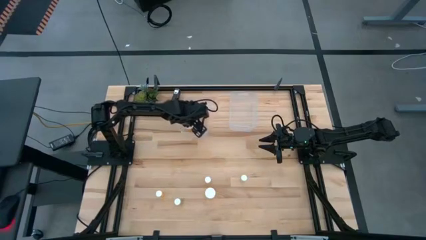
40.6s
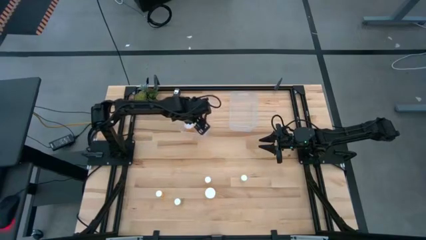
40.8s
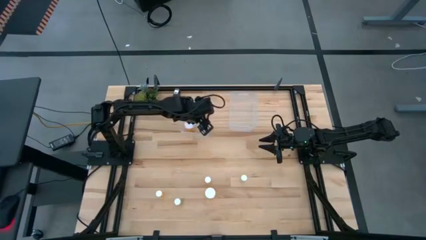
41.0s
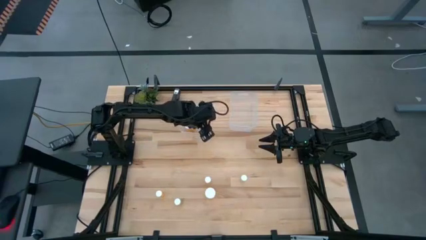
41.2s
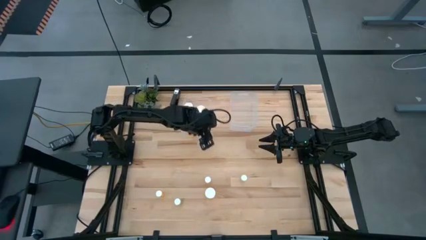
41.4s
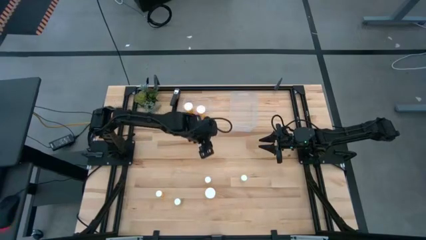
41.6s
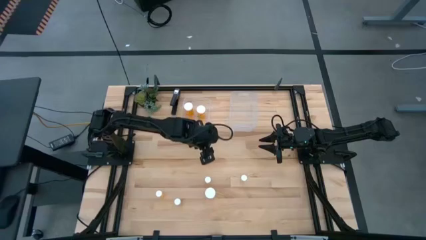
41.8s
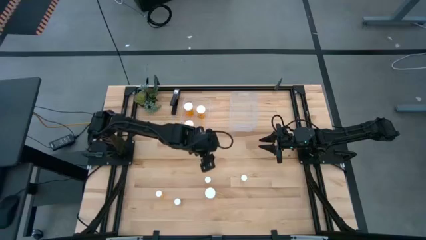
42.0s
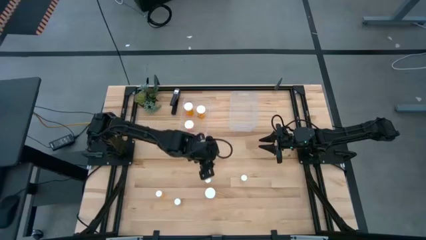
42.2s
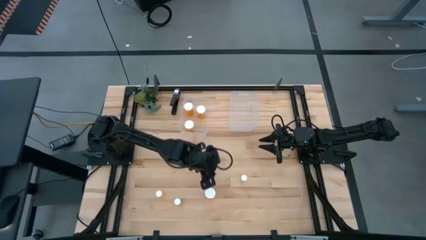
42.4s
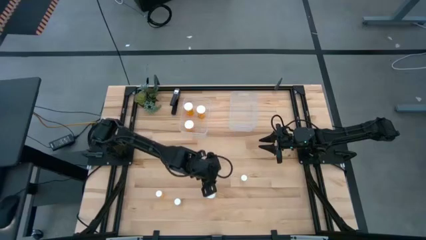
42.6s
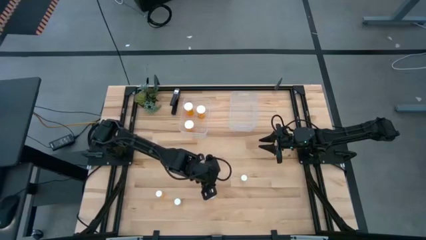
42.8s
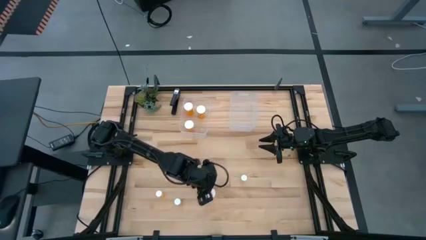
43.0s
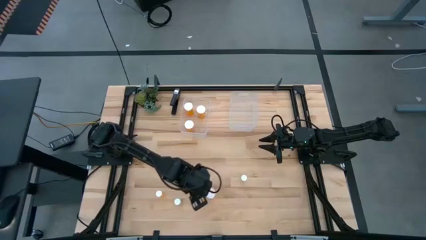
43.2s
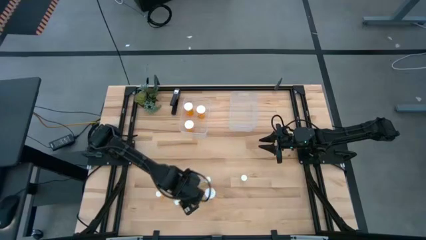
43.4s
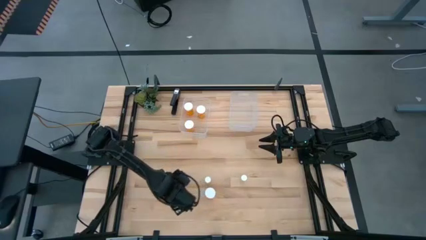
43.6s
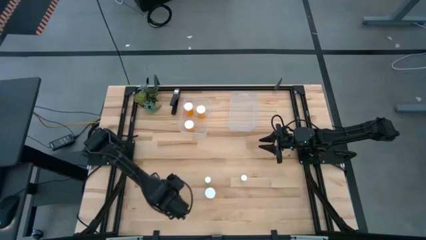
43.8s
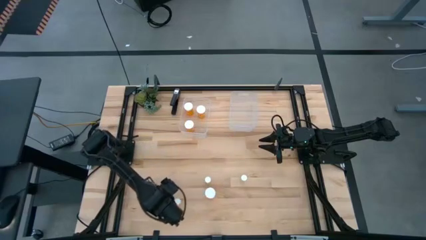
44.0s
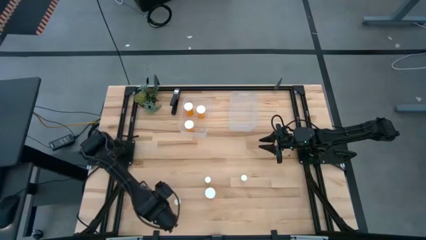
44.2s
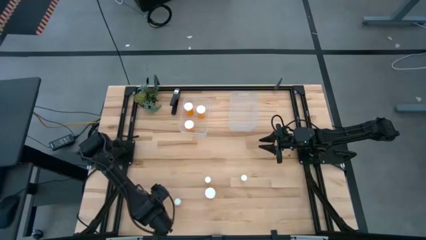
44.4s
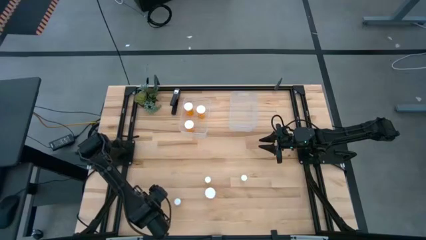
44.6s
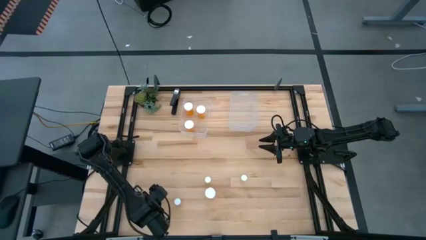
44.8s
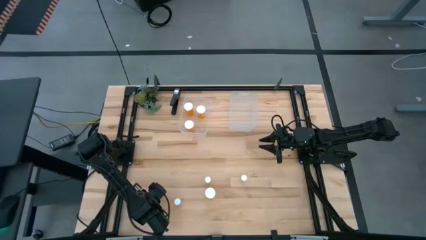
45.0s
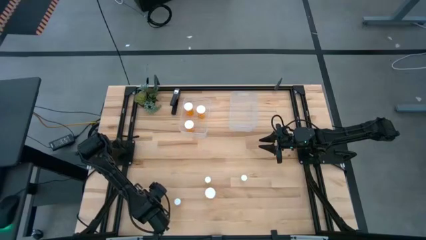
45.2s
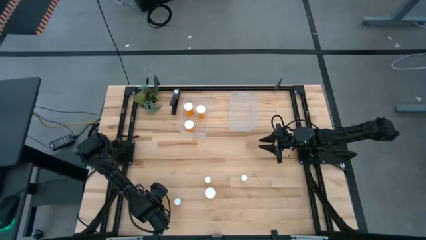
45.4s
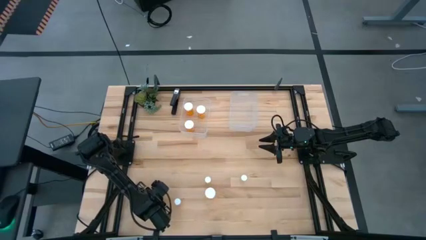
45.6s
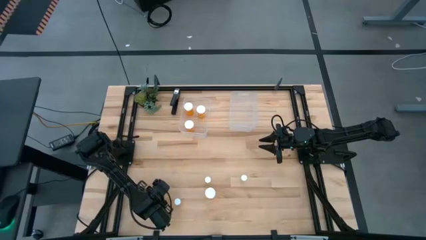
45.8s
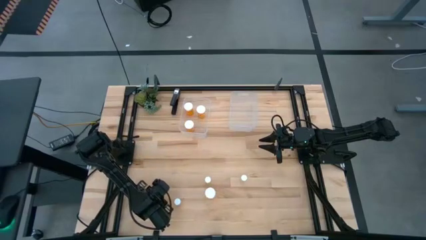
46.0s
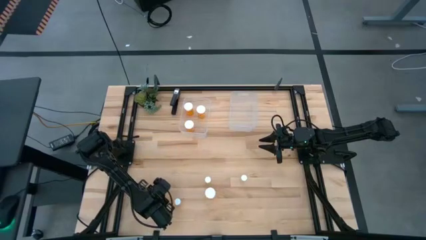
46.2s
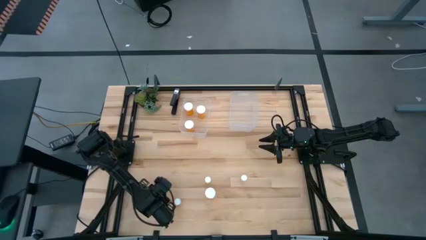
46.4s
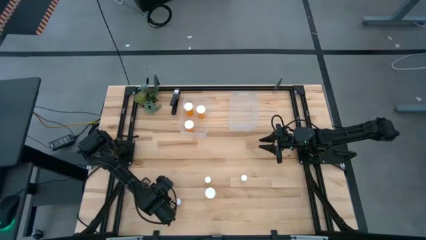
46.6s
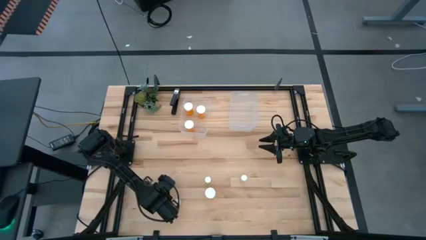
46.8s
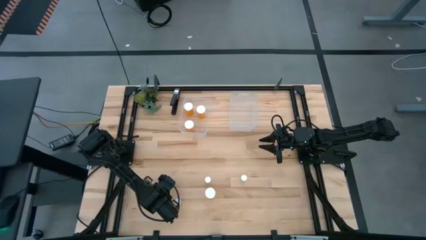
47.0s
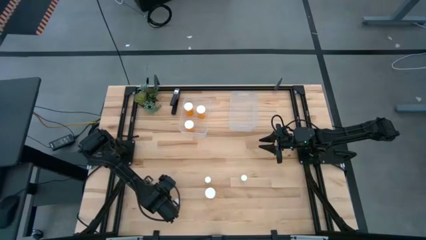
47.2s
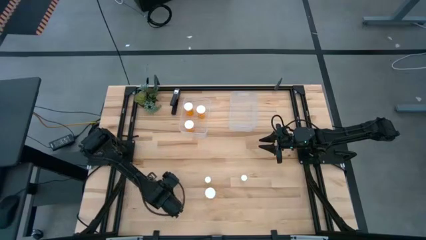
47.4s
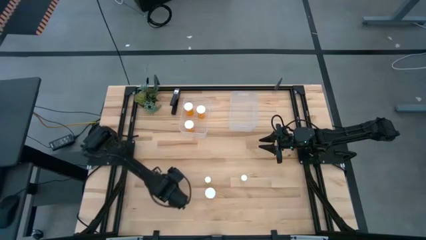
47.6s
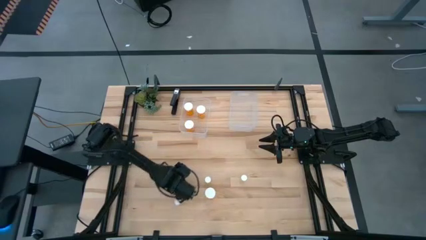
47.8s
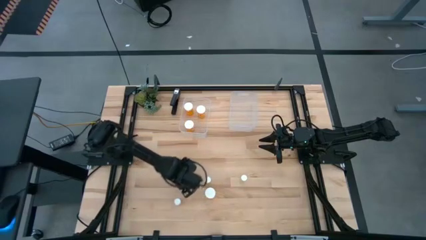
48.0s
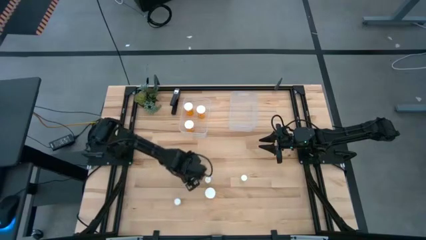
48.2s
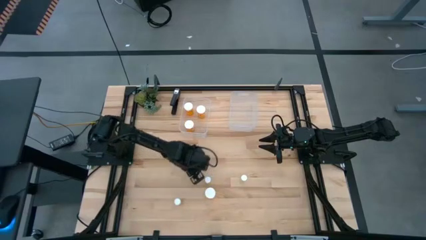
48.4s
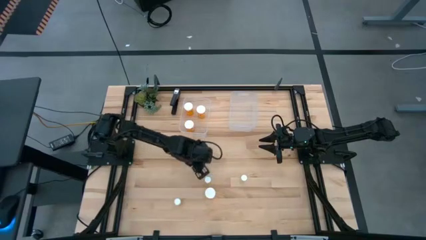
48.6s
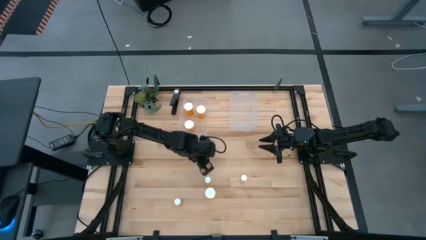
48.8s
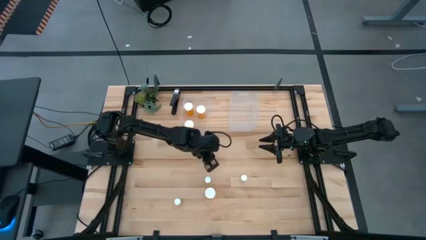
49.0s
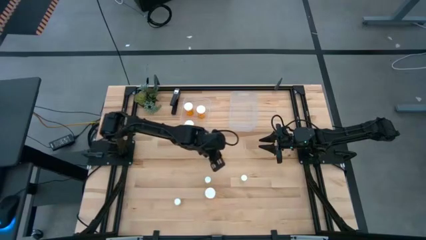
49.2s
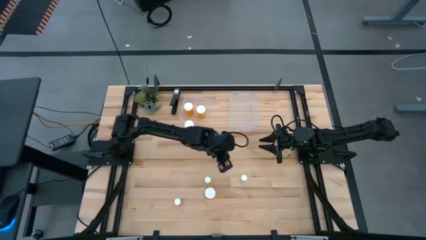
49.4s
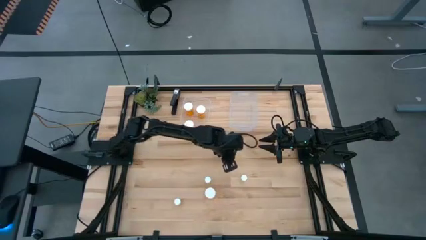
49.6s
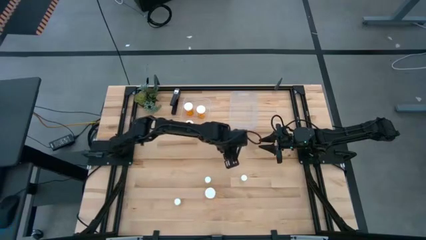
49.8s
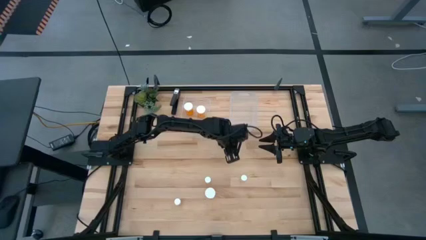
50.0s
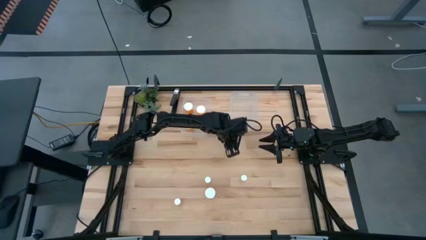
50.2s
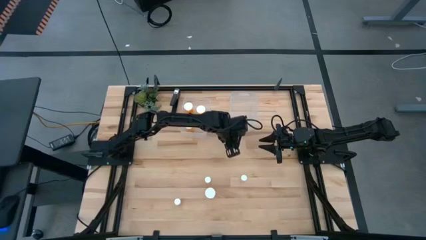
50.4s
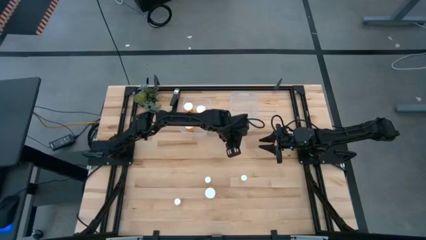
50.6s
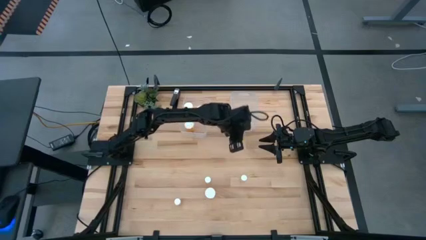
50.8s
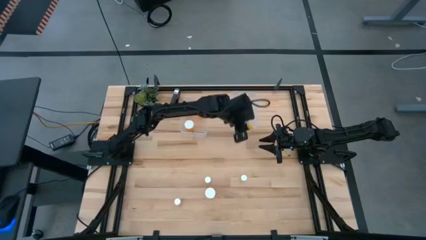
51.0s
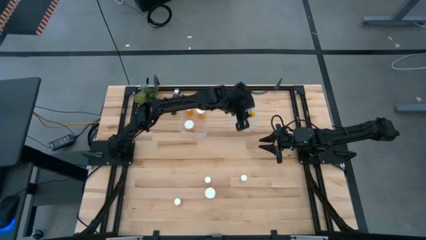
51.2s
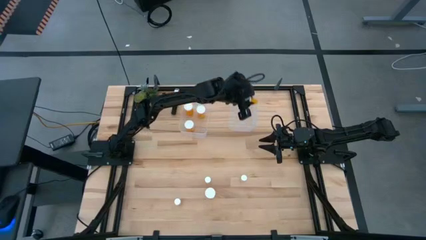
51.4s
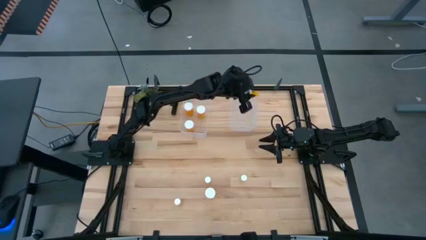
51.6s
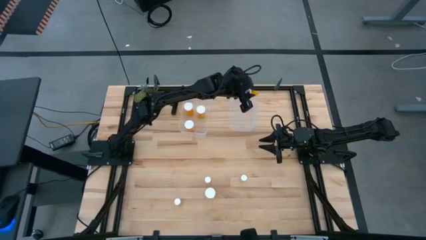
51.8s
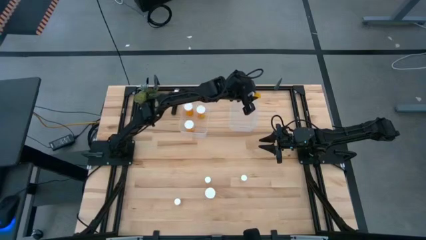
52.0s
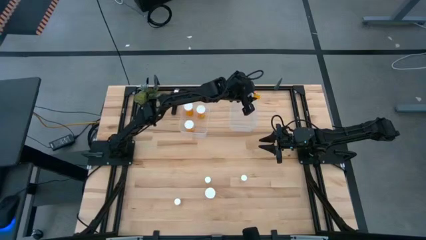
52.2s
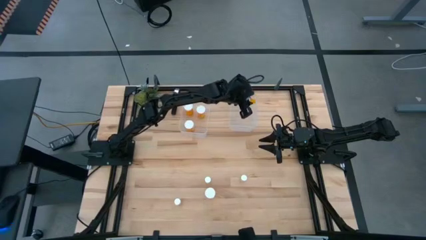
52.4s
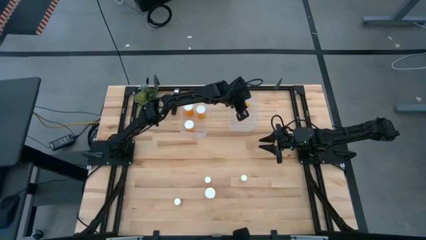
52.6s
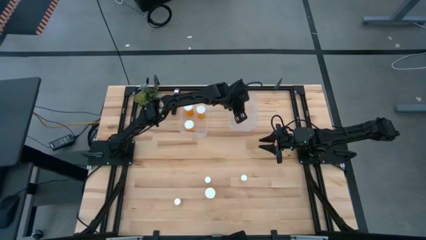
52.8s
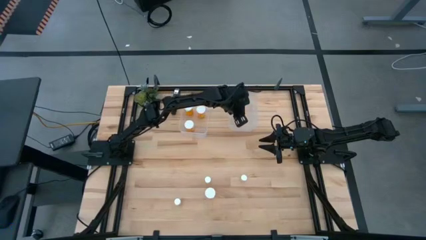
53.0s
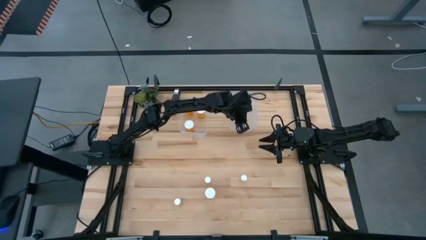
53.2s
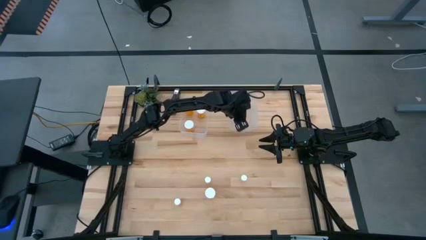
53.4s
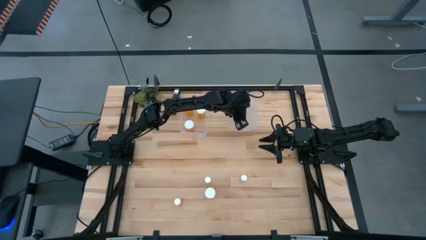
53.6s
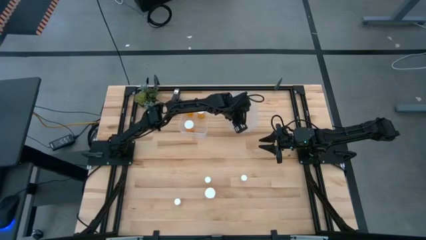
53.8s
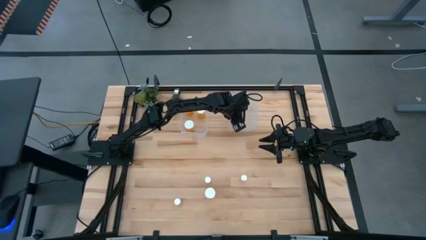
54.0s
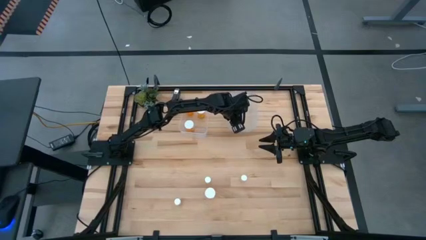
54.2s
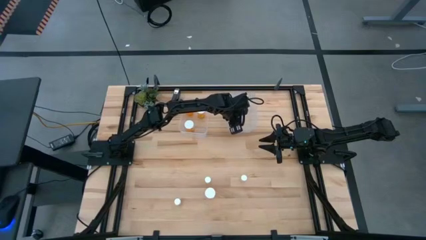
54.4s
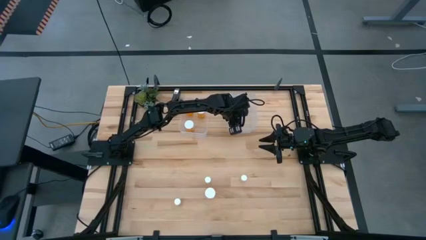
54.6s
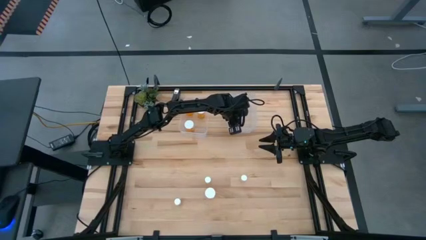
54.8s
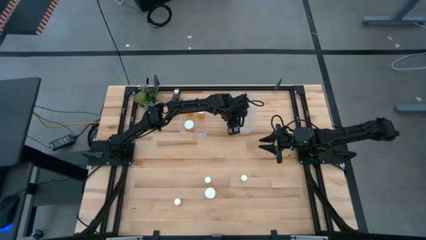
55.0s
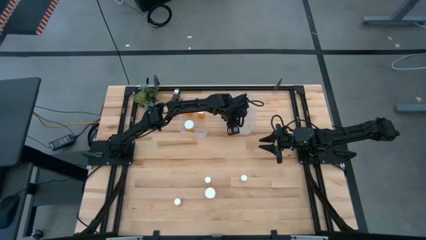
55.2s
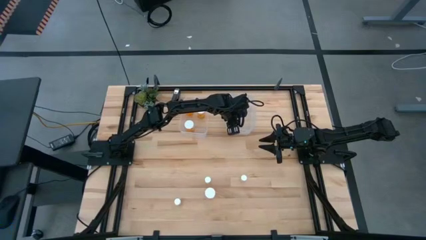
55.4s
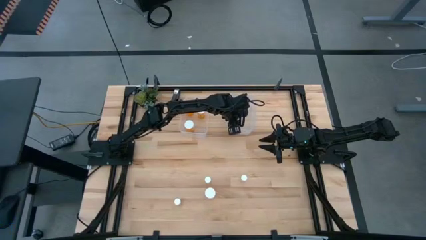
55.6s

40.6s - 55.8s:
Task: Pick and place medicine bottles into bin by pill shape (circle, oval)
Put the small orange pill bottle in the right transparent bin
